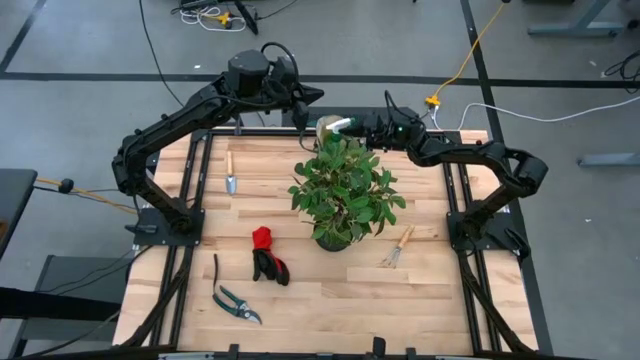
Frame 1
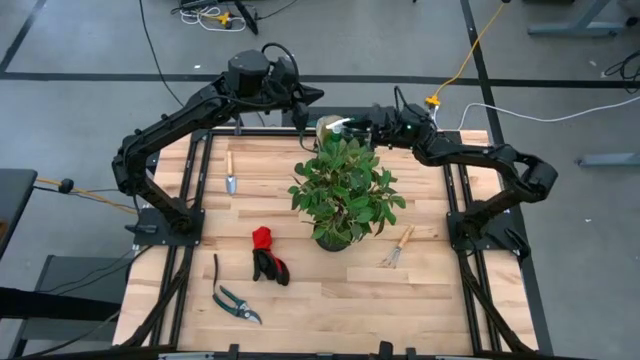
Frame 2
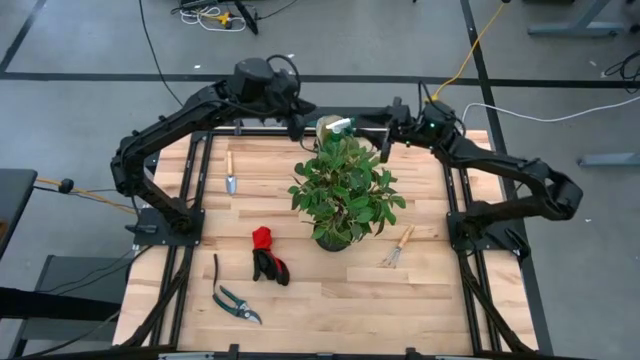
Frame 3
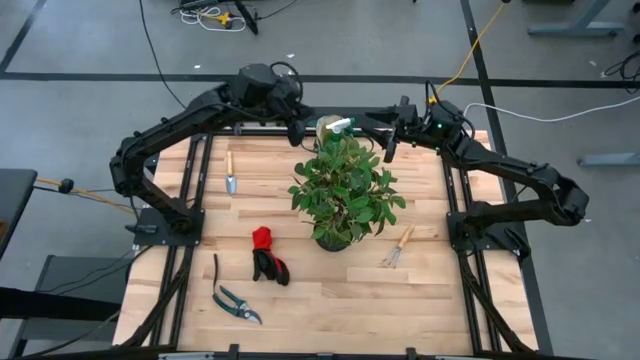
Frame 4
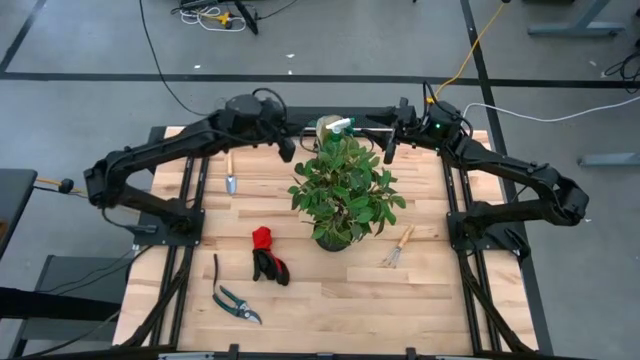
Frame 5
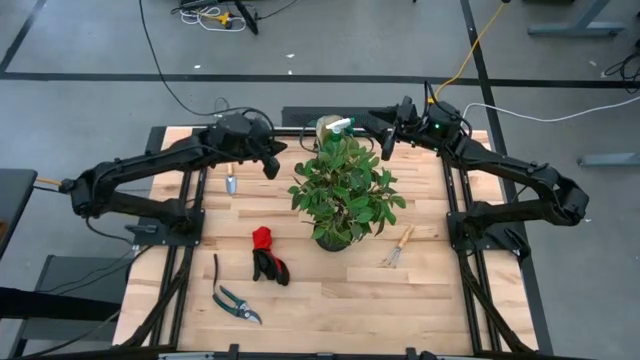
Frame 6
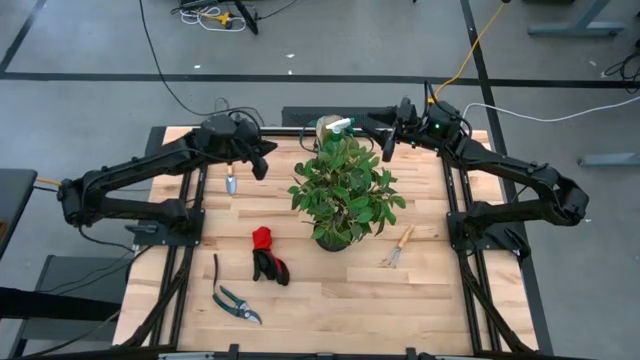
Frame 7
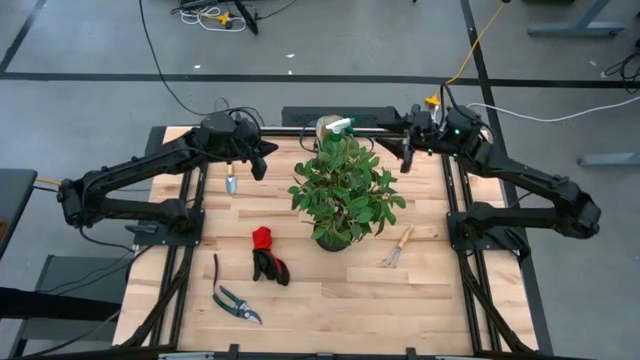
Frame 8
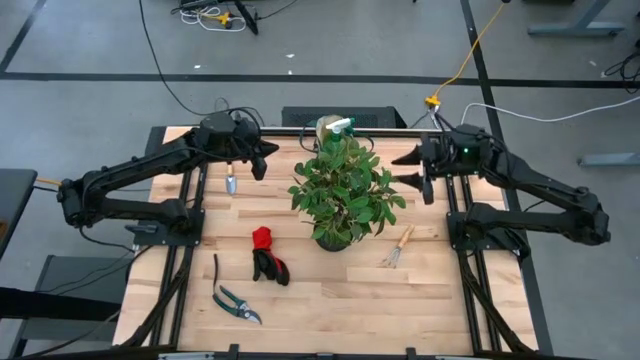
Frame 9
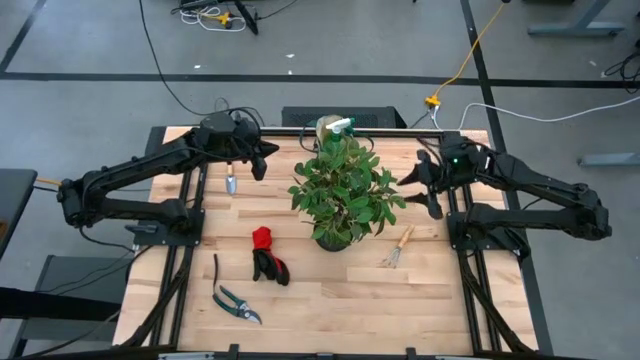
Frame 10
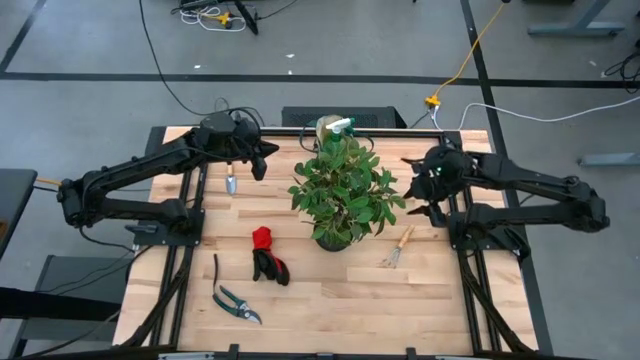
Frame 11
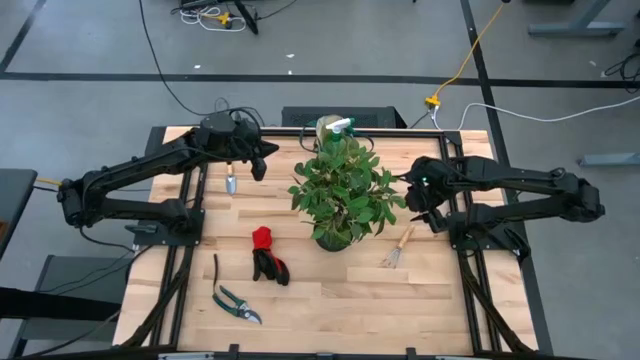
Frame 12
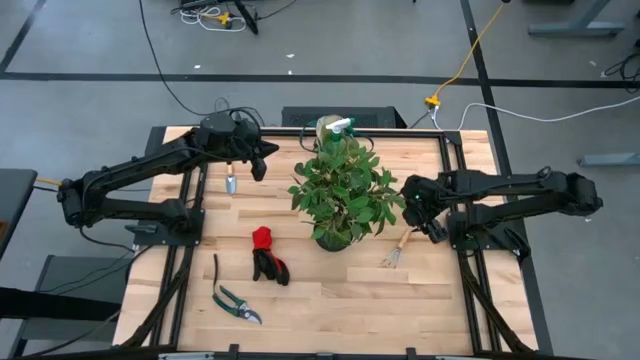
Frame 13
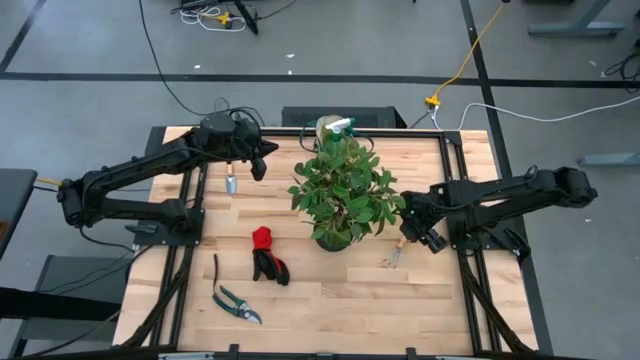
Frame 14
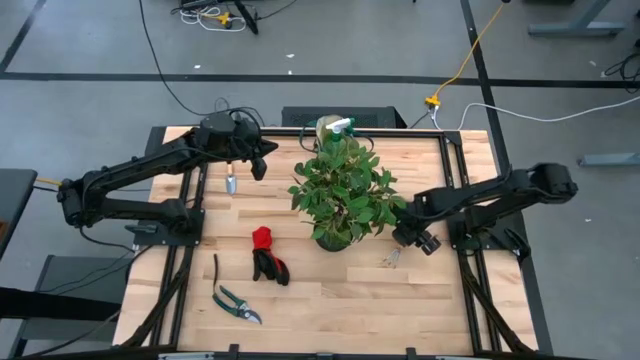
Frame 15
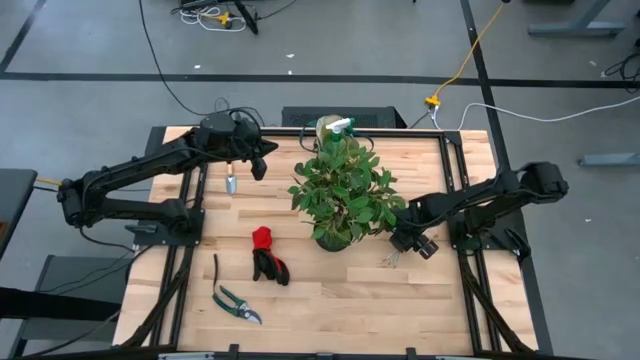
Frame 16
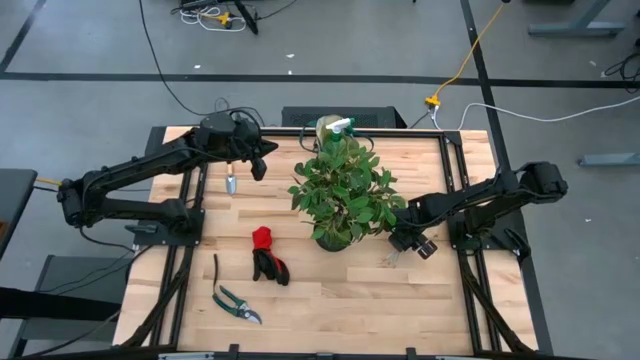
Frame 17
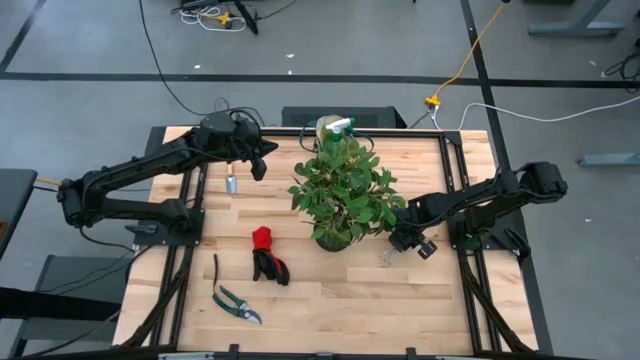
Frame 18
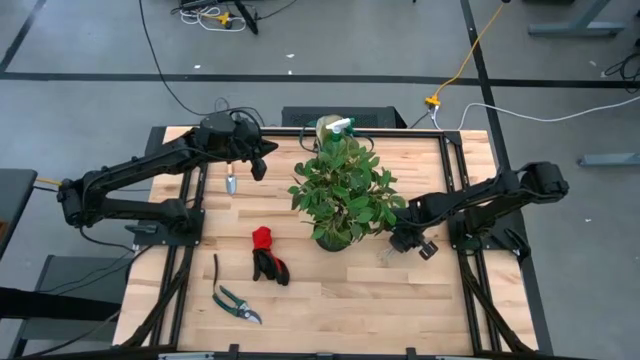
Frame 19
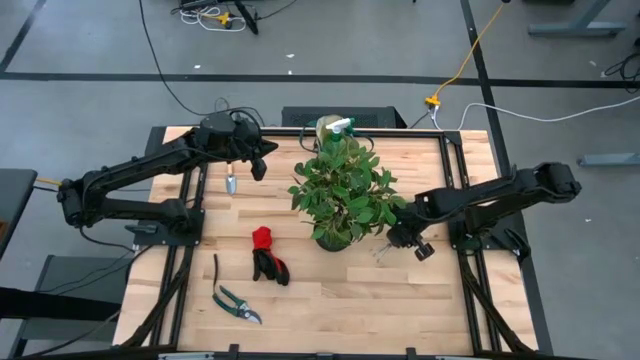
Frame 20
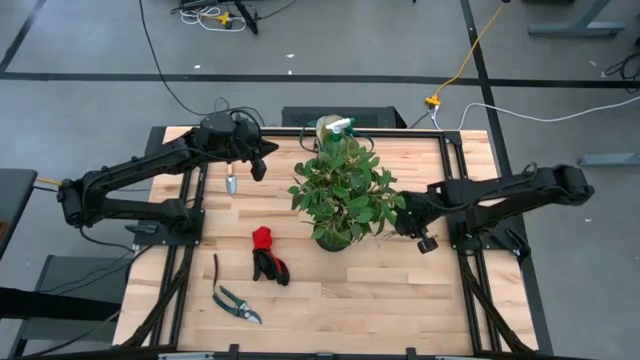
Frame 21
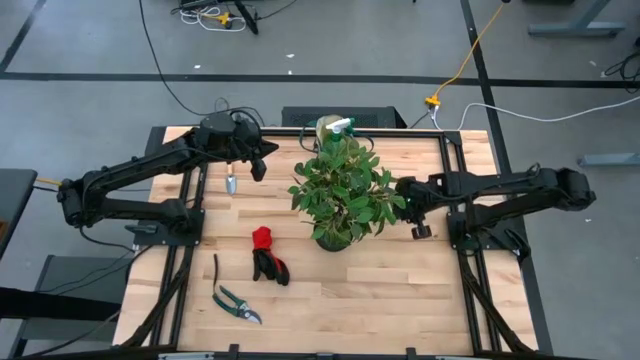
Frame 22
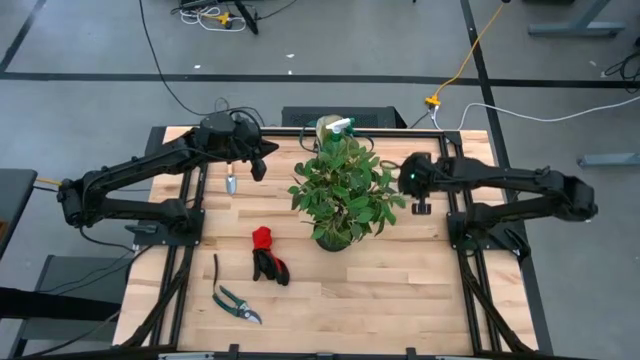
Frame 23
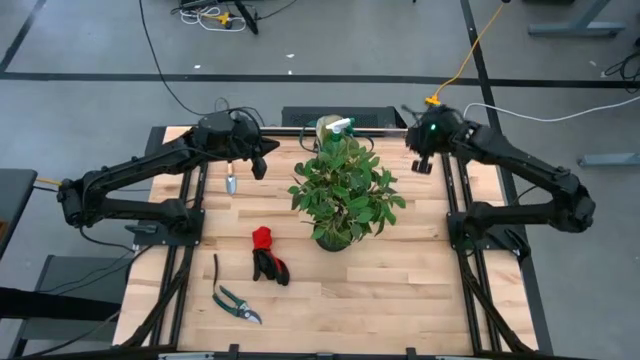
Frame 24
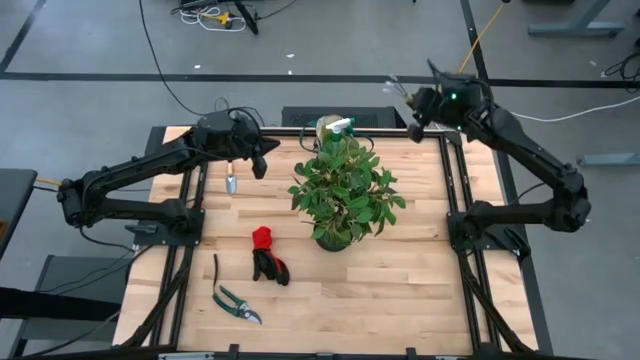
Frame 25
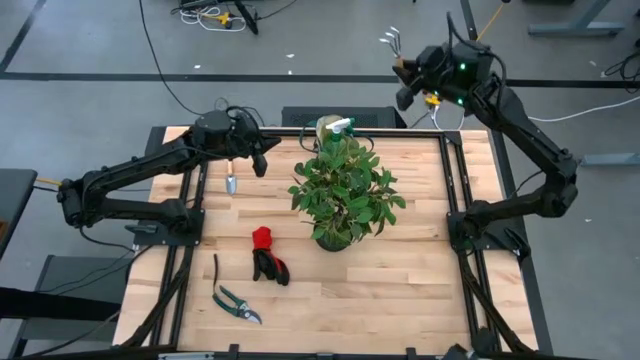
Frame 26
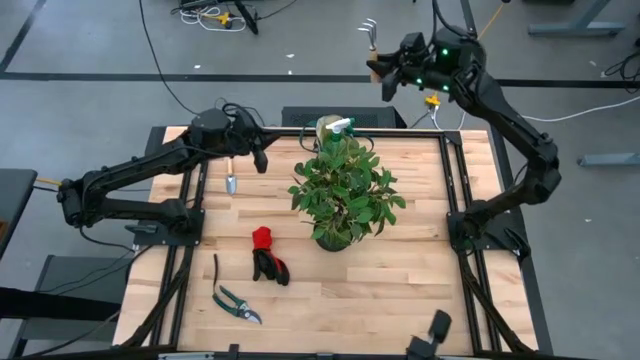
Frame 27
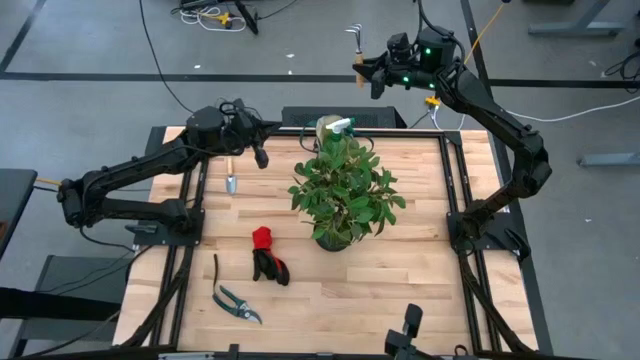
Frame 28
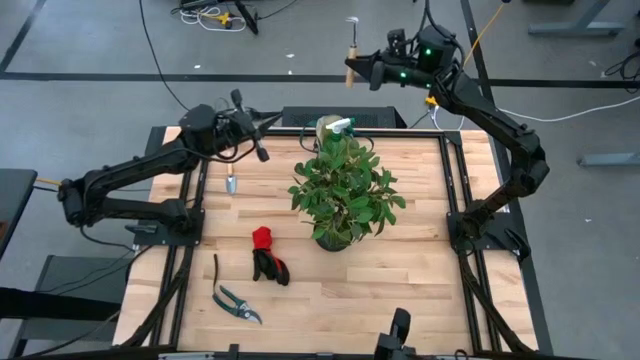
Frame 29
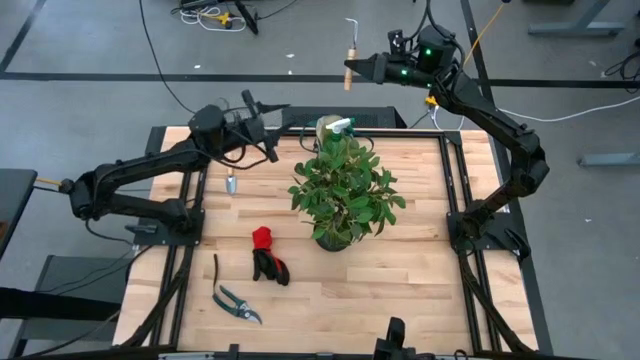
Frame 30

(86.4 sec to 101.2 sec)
Task: Pick & Place Garden tools in Gardening bag
Put the brown hand rake into the gardening bag

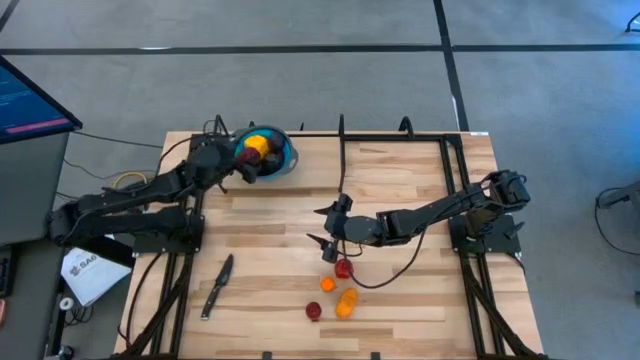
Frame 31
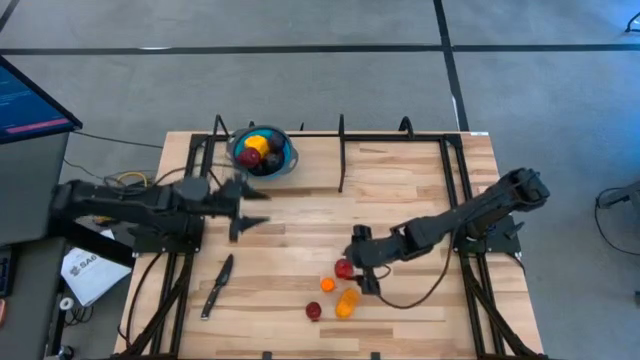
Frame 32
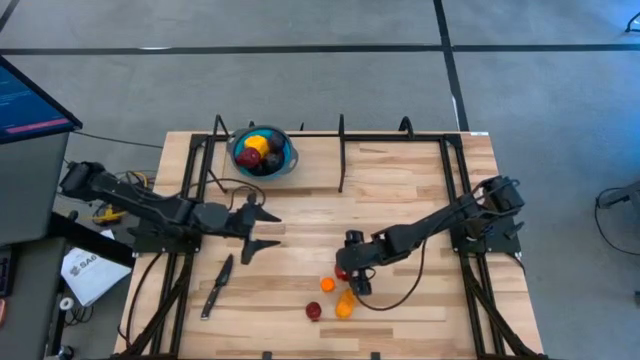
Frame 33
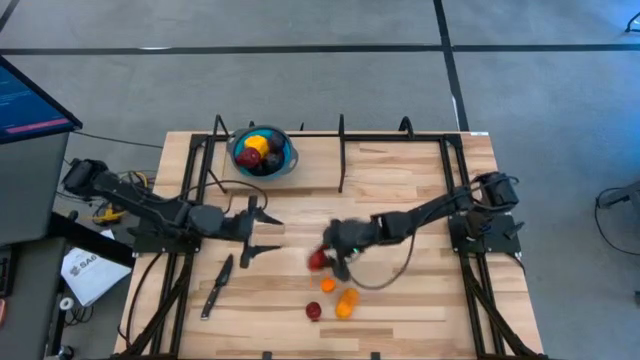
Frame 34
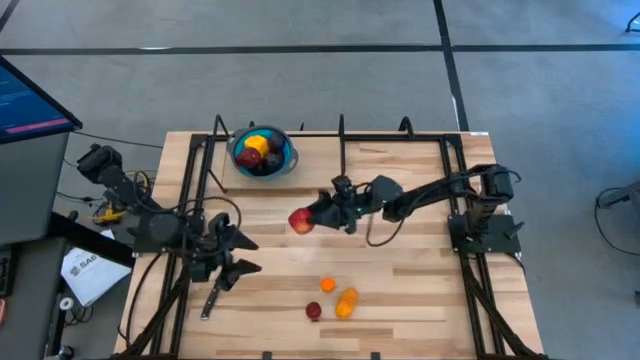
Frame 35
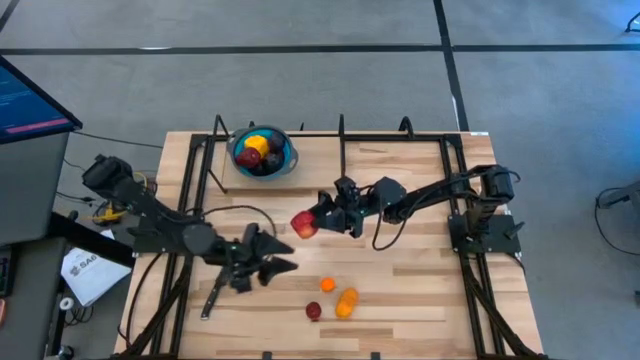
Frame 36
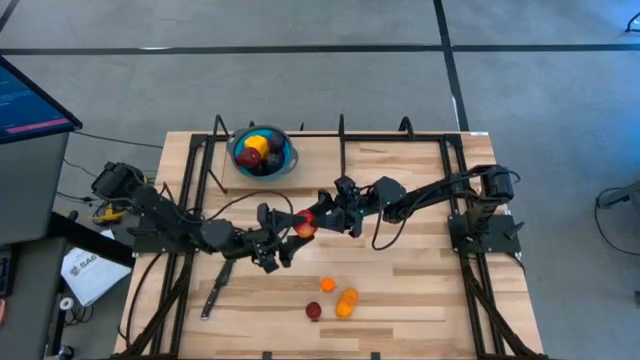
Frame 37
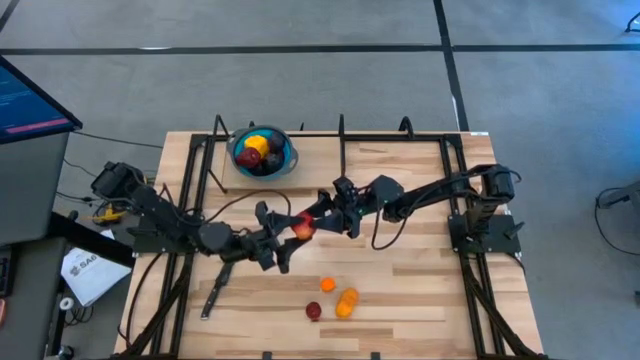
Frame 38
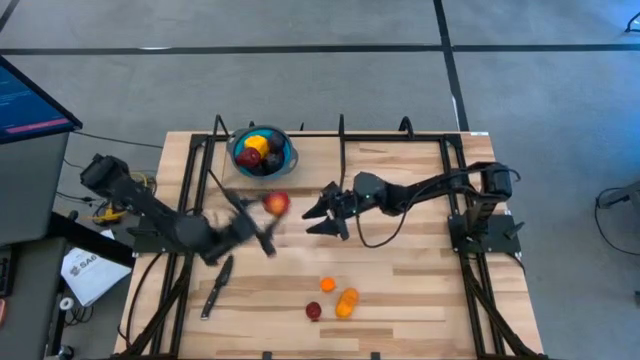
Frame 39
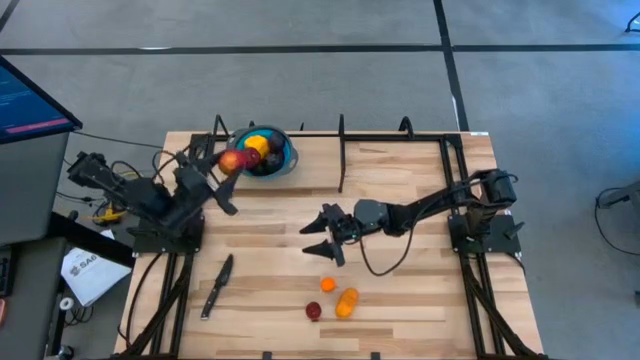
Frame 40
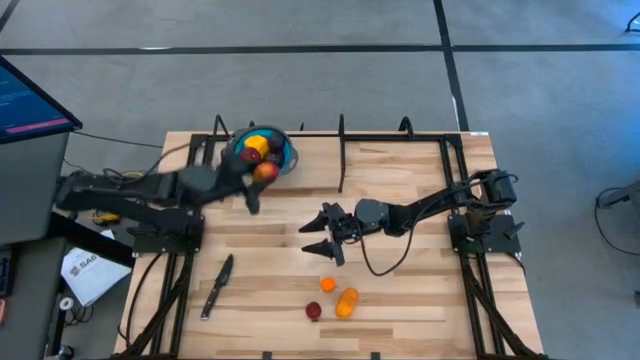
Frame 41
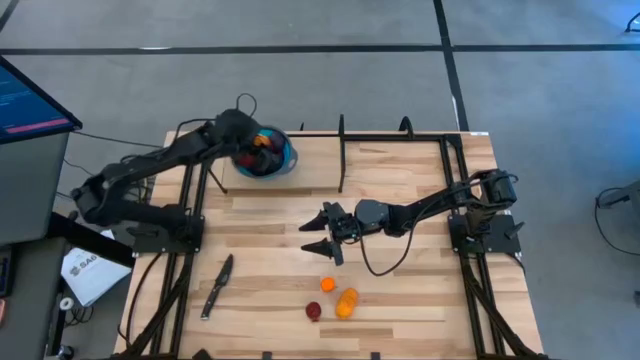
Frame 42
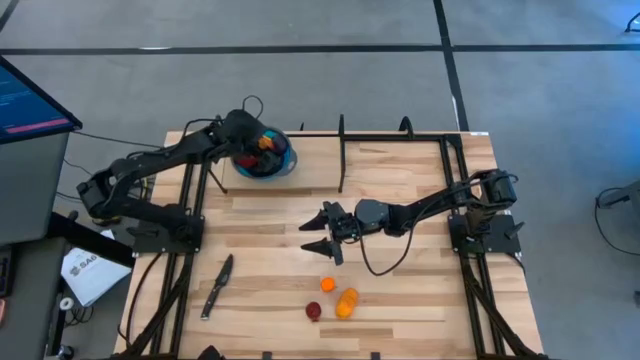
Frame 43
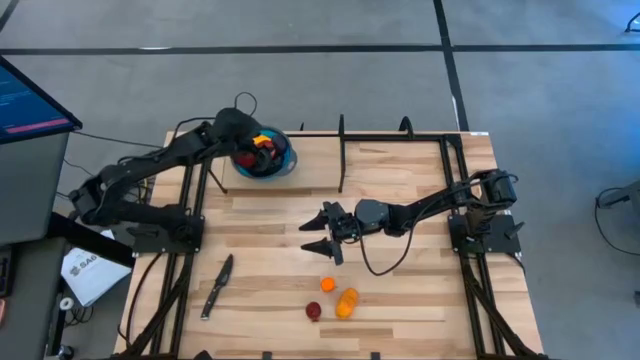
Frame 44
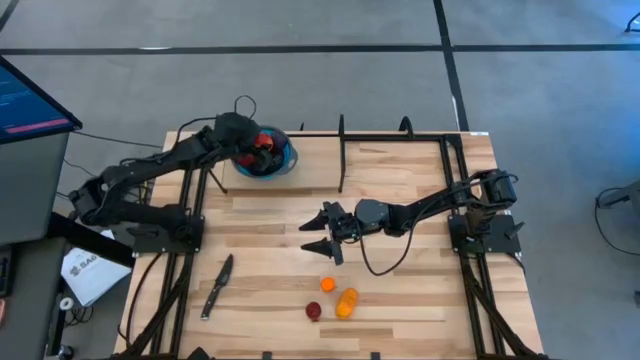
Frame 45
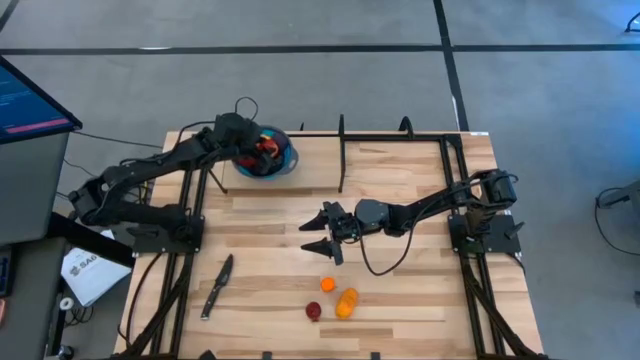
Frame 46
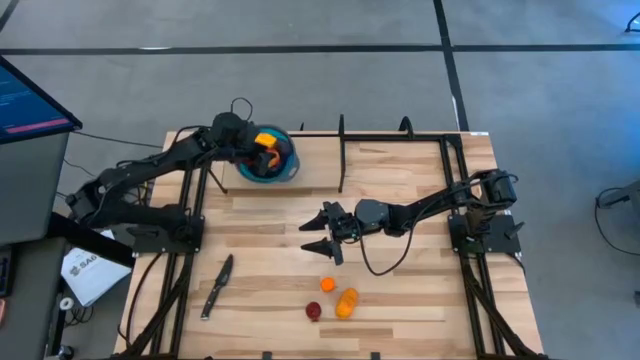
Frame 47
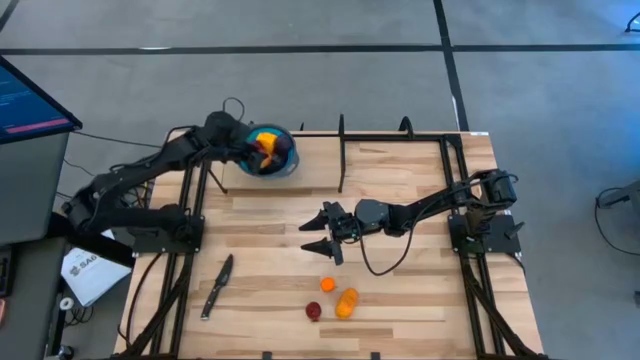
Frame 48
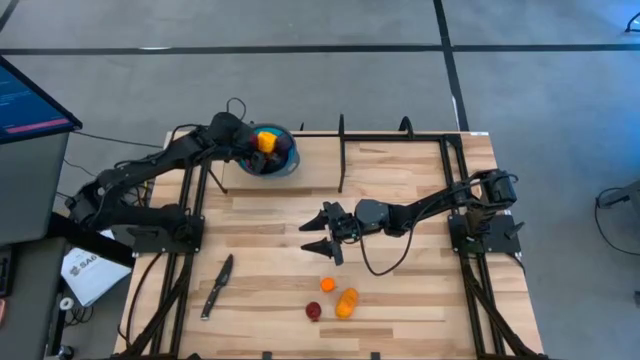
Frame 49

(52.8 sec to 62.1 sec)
Task: Pick & Place Fruit
Put the apple in the blue strainer bowl on the shelf
